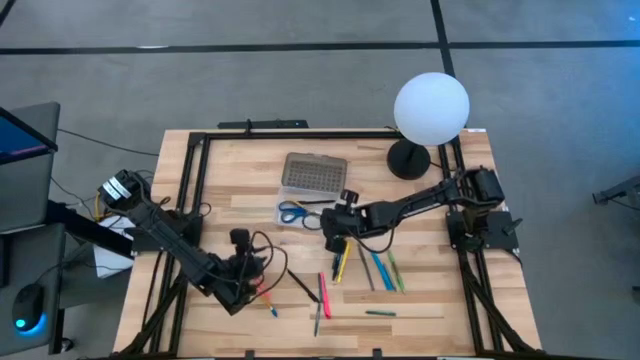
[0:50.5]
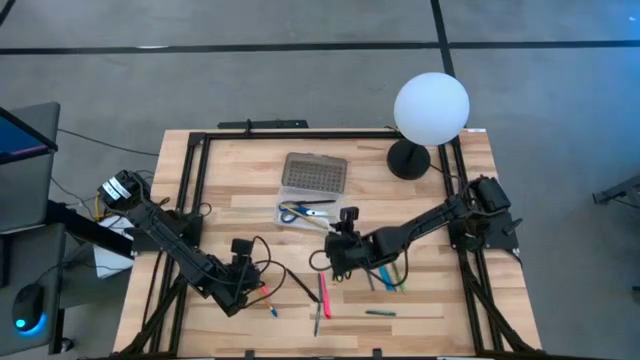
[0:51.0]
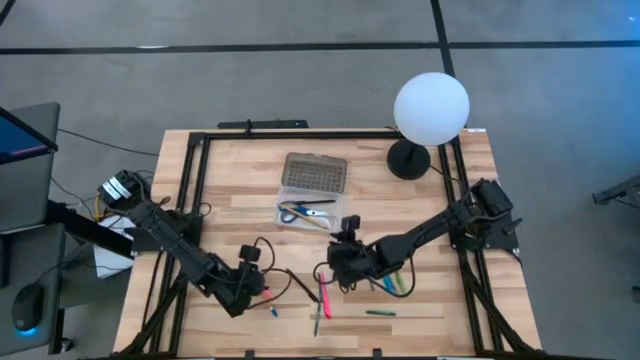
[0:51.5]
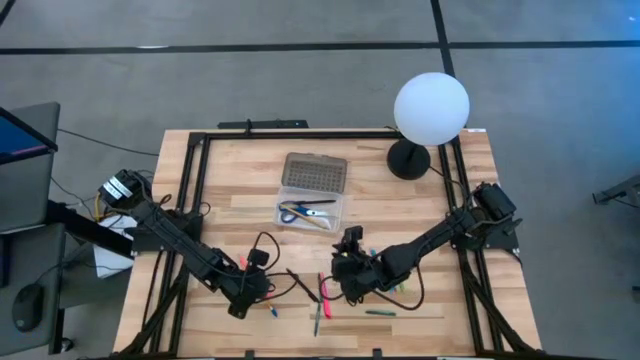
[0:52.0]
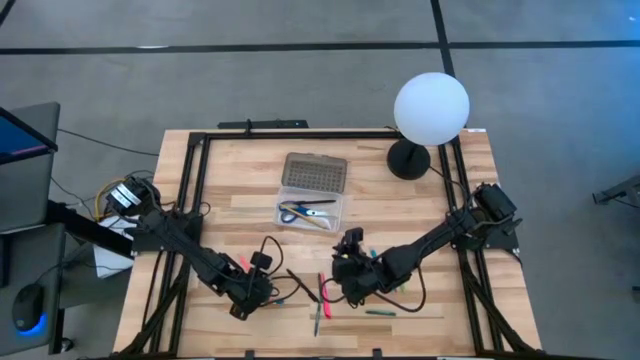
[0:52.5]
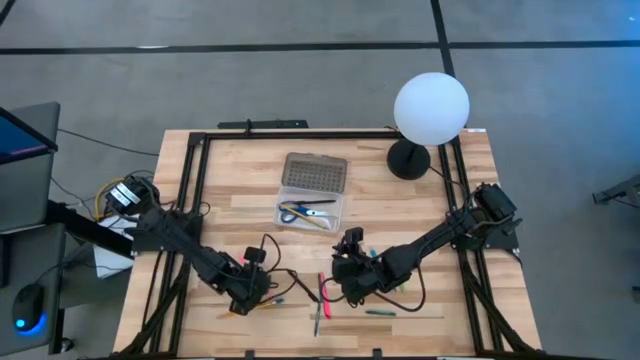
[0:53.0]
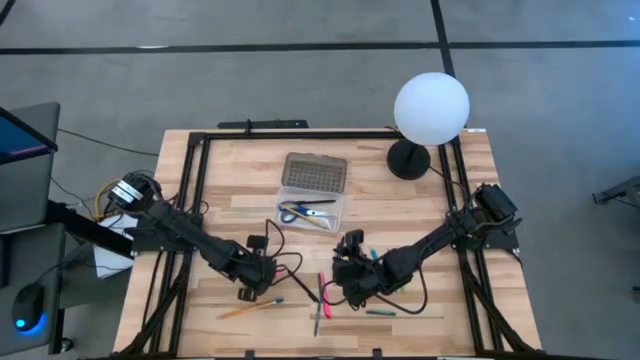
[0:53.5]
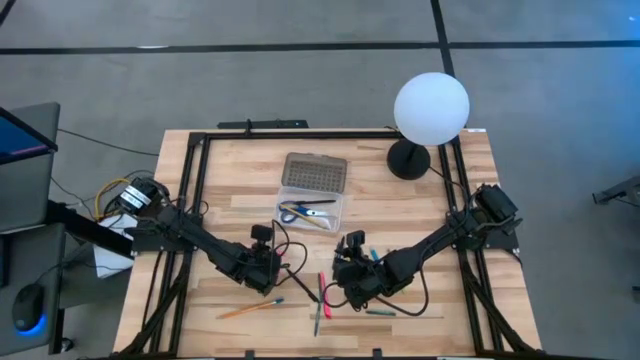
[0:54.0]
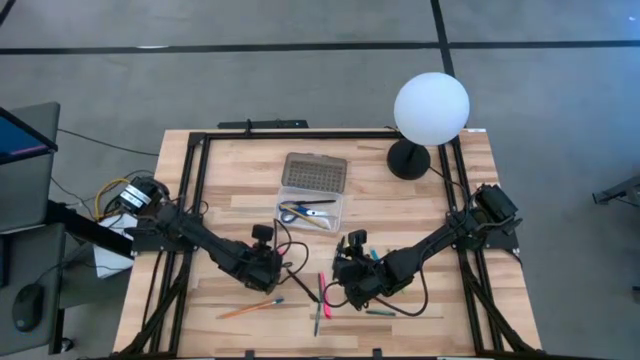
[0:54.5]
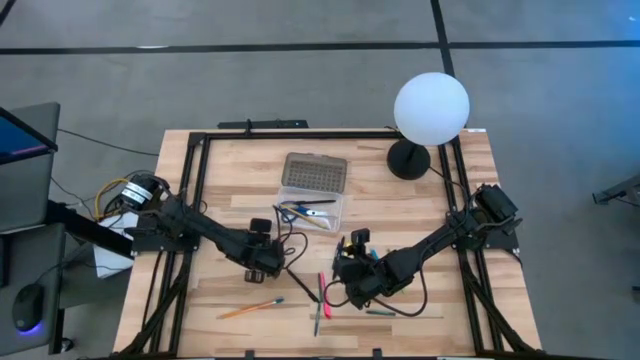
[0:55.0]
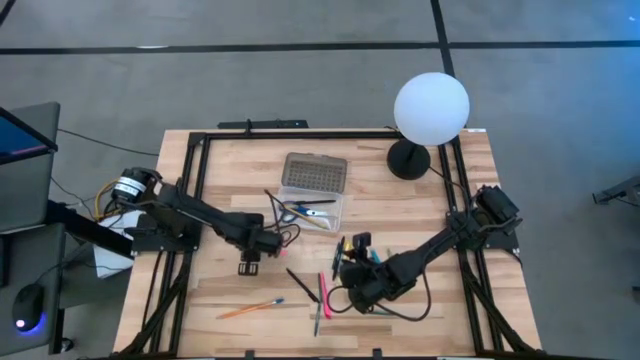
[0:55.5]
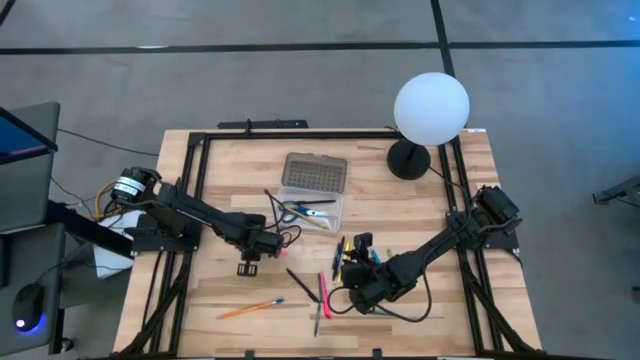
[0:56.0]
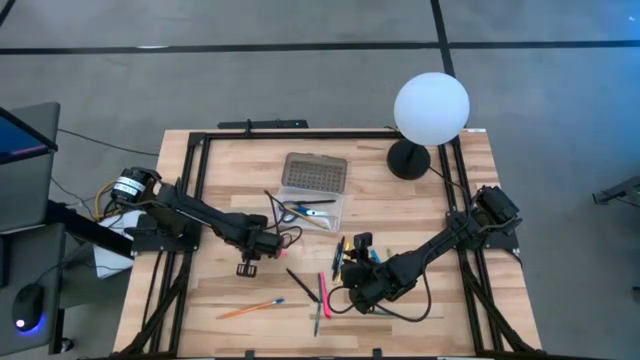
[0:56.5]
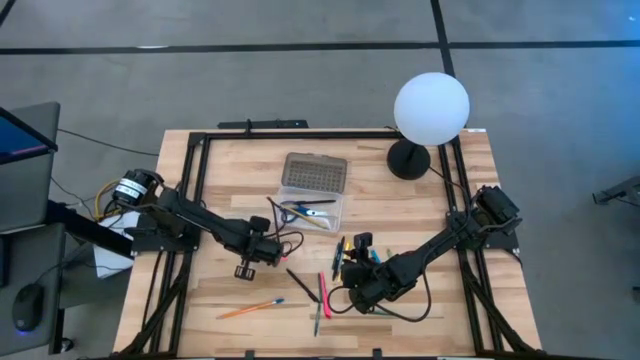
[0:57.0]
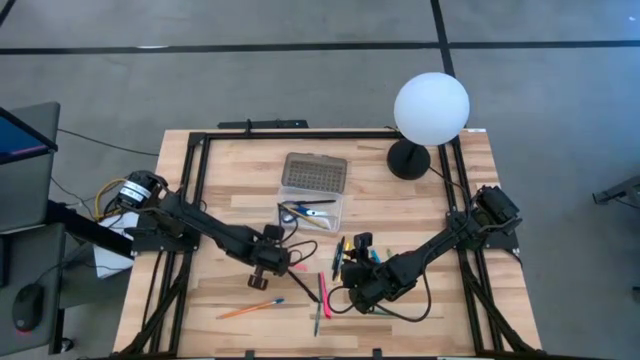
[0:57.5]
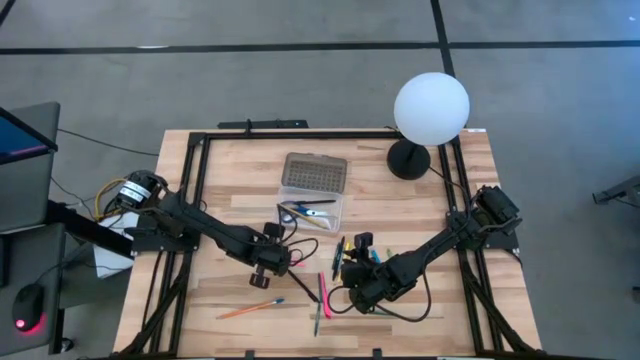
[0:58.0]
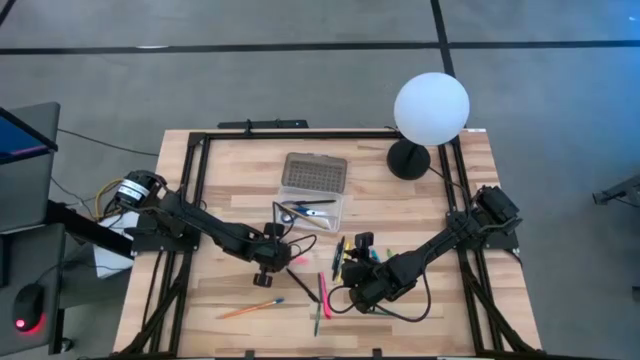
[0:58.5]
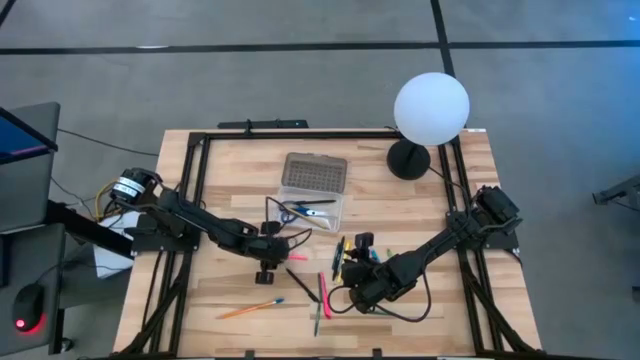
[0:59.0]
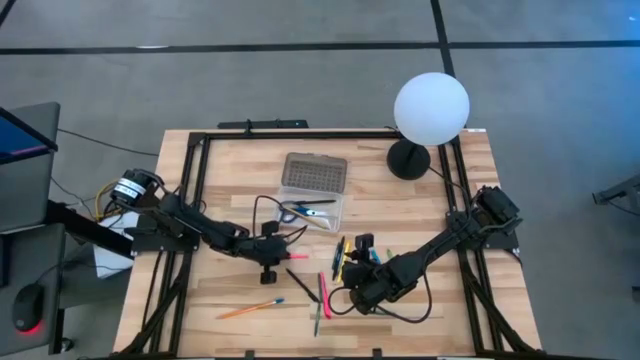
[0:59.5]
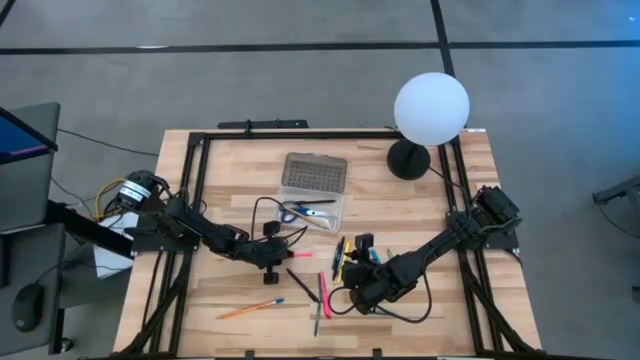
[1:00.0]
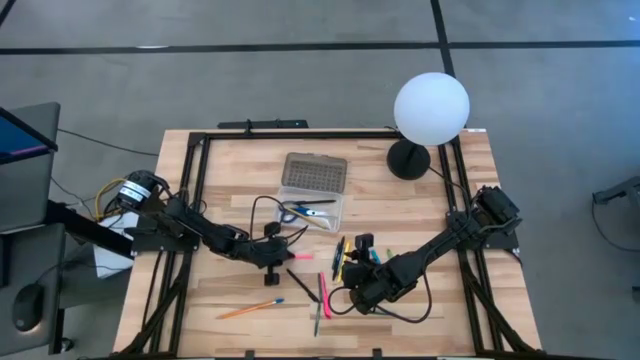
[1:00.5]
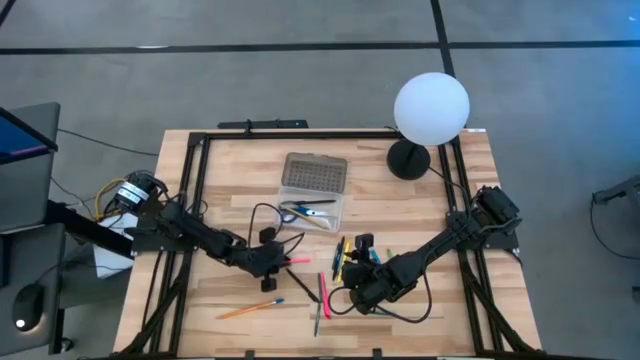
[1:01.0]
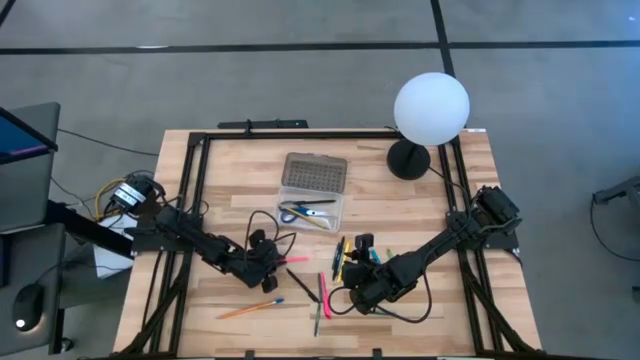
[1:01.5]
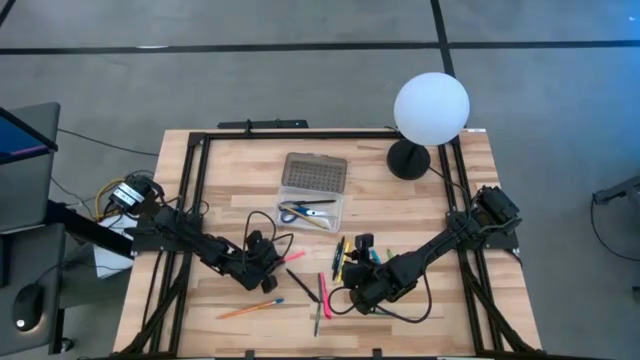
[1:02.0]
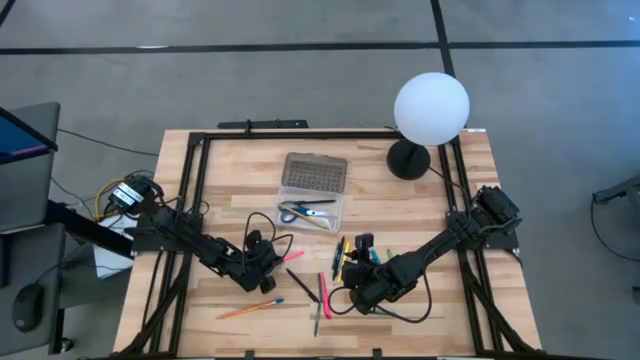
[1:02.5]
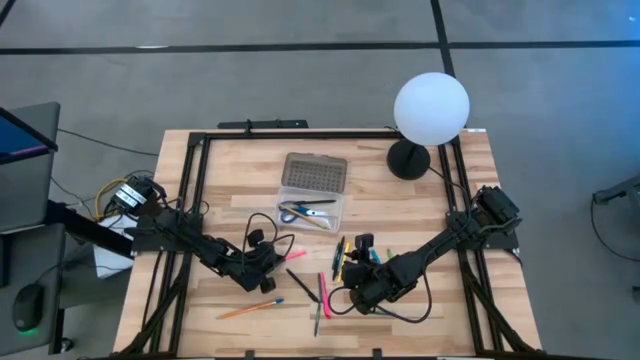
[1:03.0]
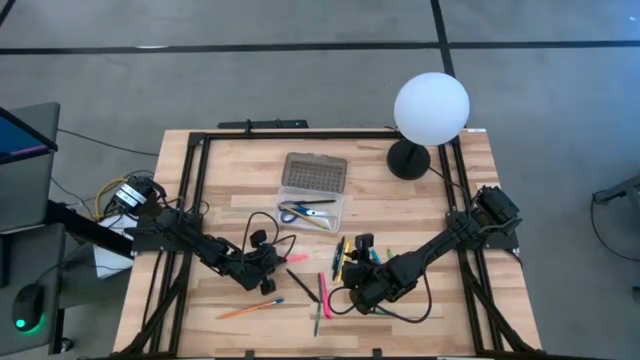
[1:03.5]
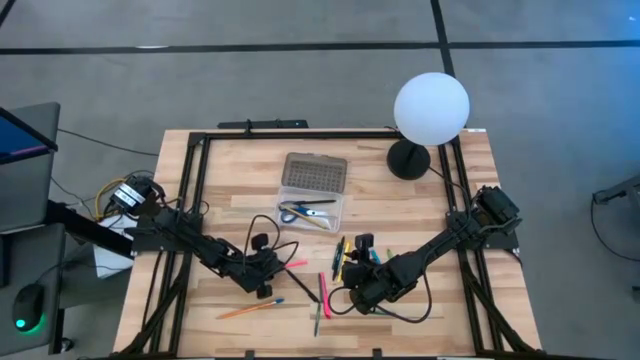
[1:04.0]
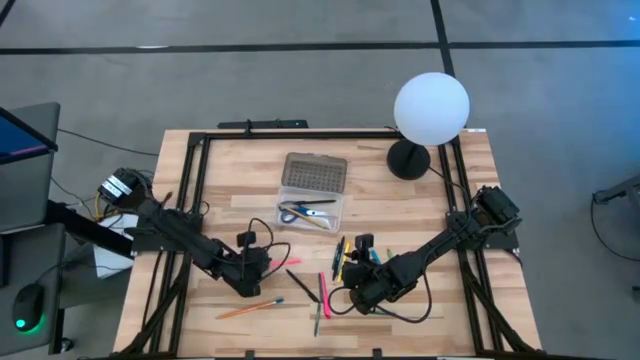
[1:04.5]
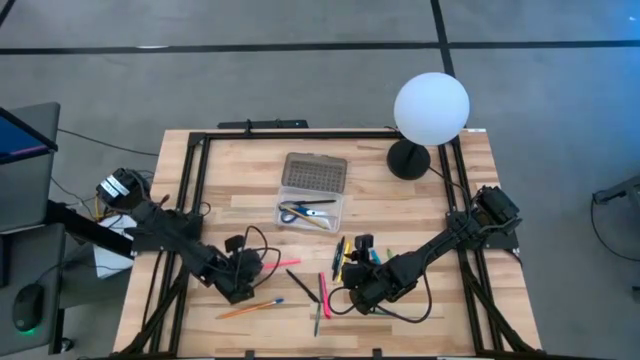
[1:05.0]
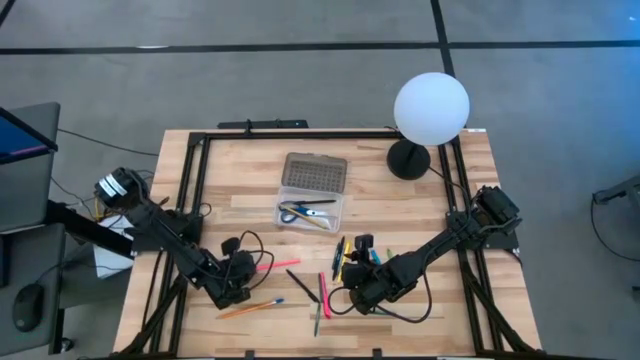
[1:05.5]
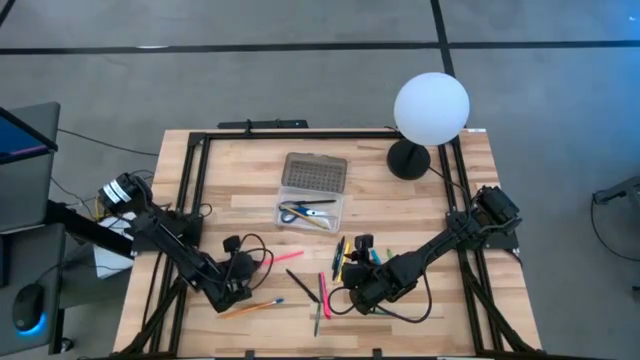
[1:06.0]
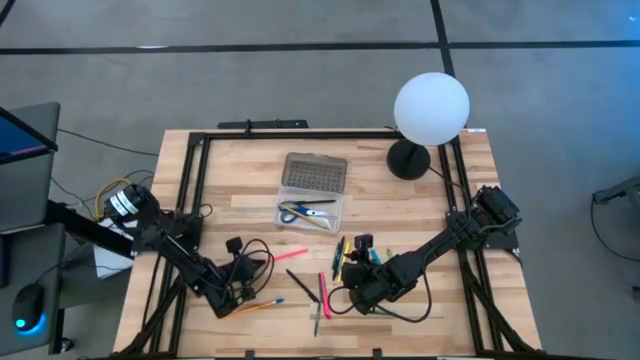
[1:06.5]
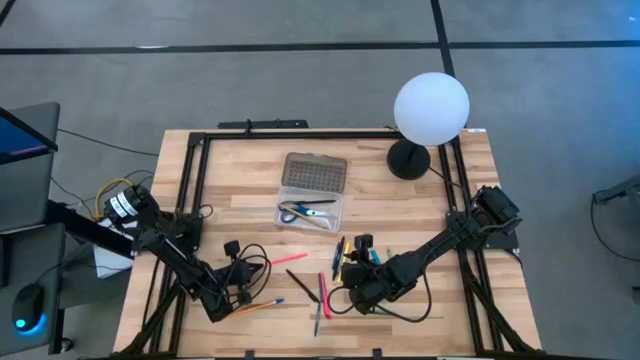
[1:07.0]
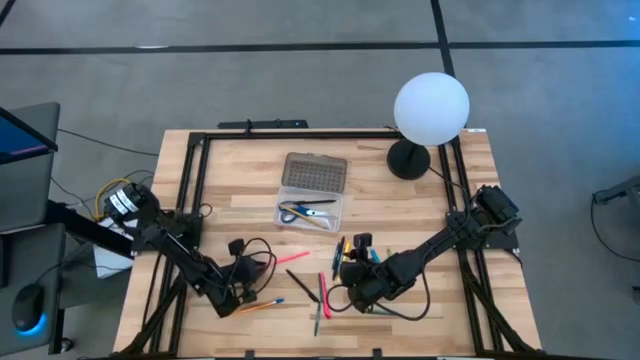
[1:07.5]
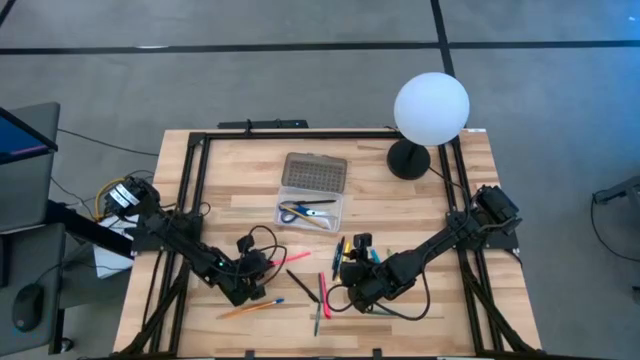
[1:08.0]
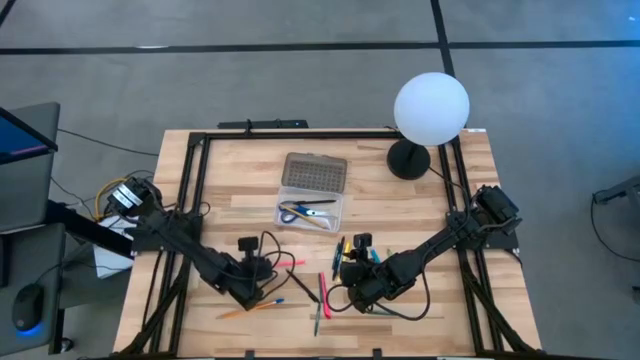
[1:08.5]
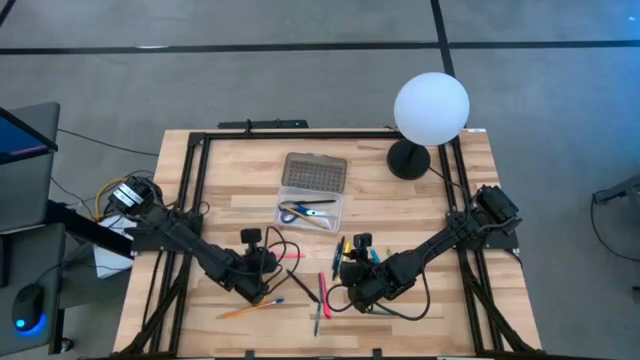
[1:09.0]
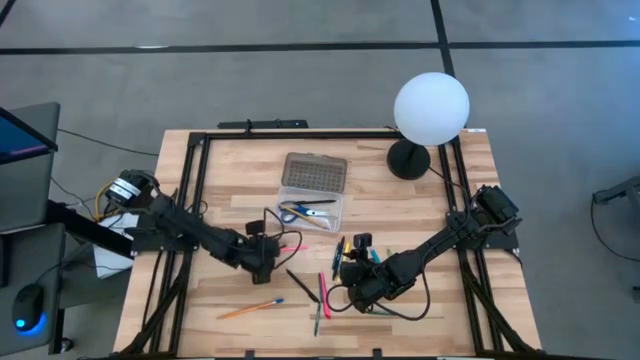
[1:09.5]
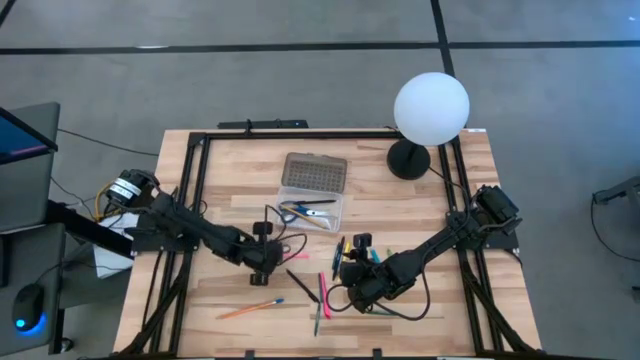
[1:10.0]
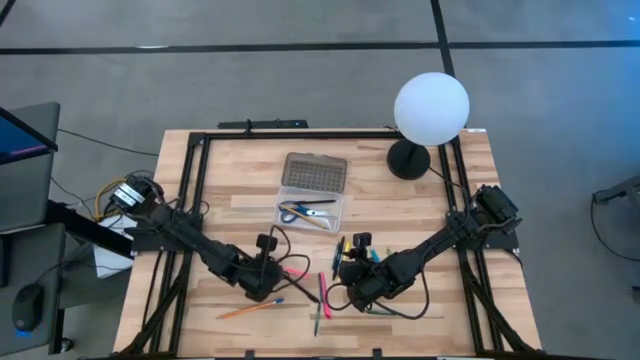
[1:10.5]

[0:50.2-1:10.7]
Task: Pick & place school supplies into a supply box
Put the pink pencil into the gray supply box
